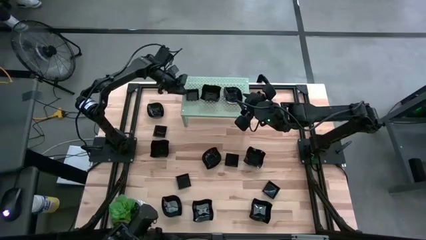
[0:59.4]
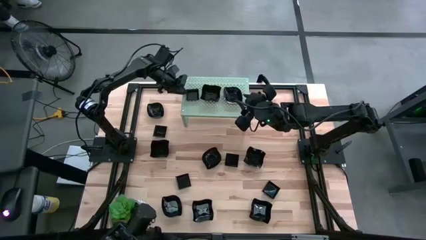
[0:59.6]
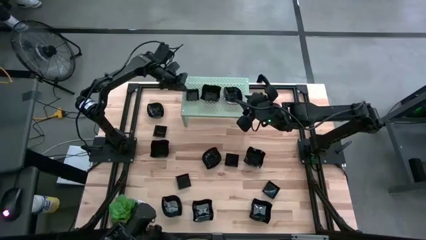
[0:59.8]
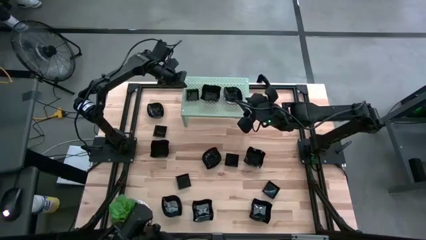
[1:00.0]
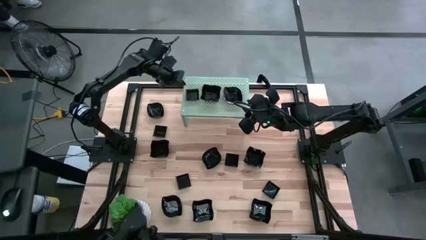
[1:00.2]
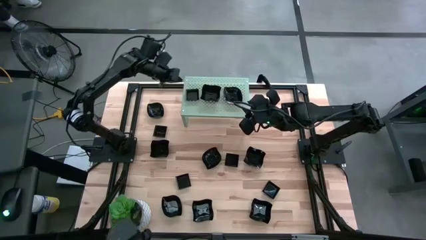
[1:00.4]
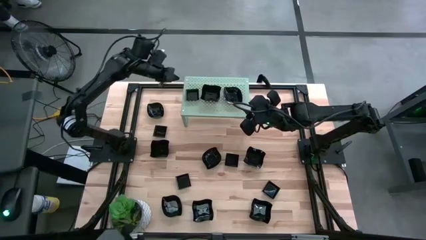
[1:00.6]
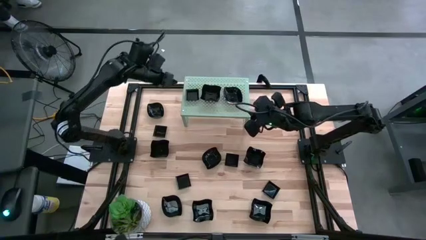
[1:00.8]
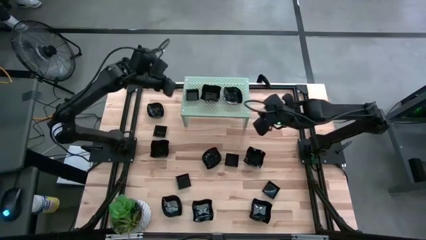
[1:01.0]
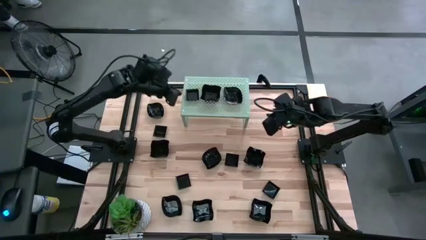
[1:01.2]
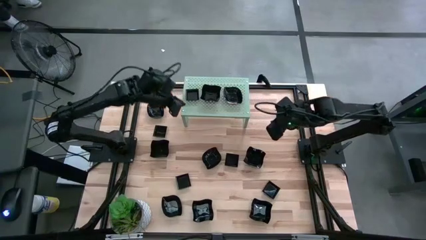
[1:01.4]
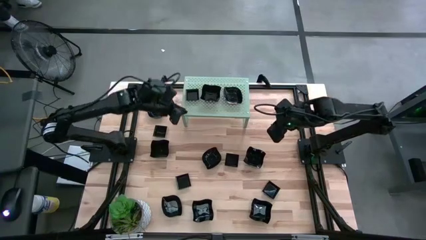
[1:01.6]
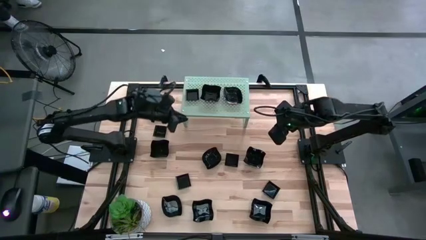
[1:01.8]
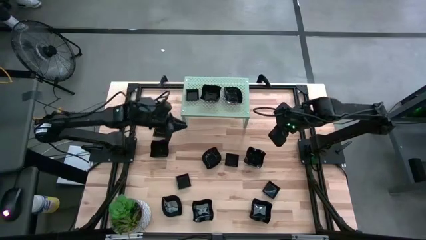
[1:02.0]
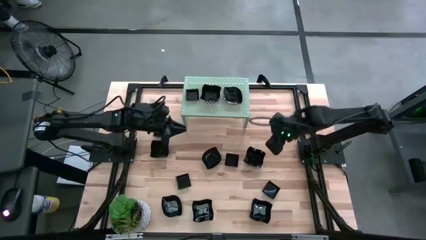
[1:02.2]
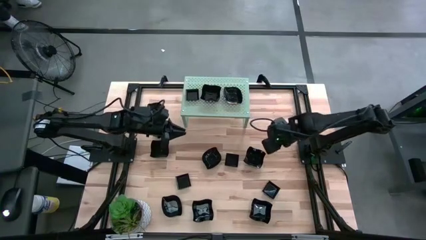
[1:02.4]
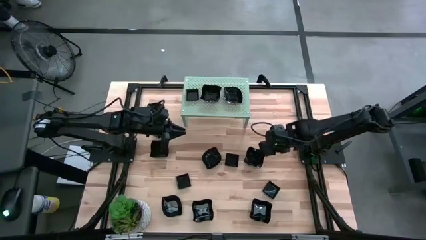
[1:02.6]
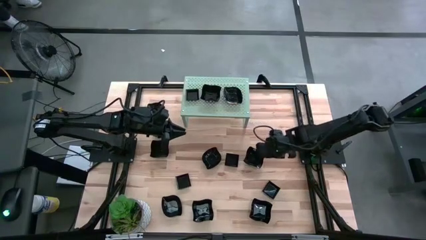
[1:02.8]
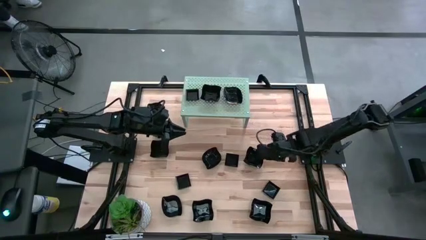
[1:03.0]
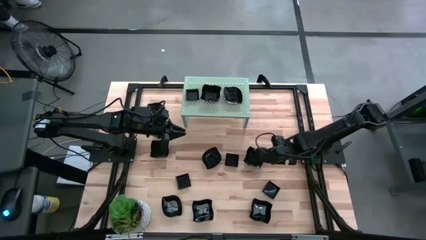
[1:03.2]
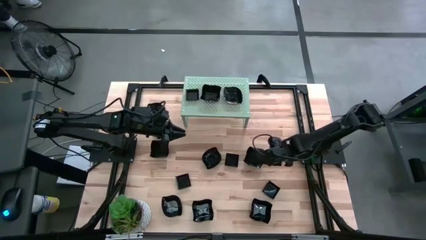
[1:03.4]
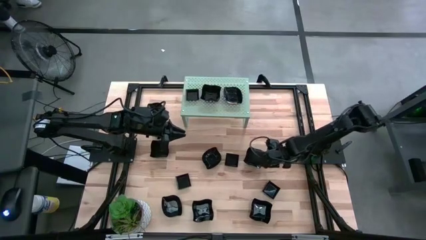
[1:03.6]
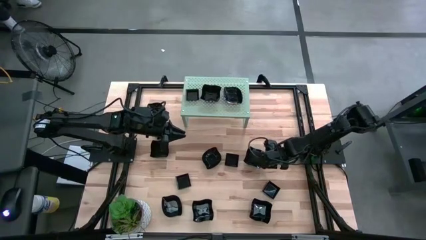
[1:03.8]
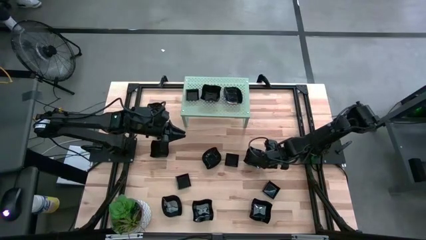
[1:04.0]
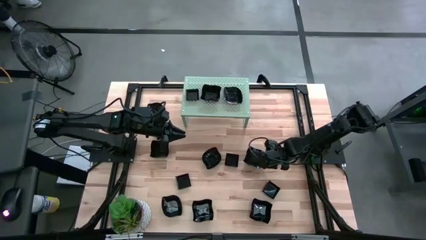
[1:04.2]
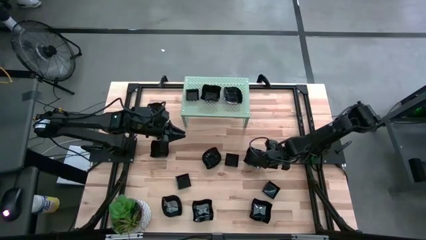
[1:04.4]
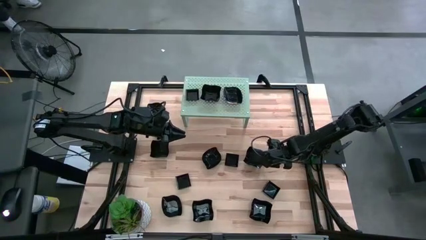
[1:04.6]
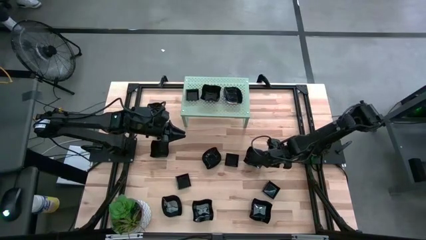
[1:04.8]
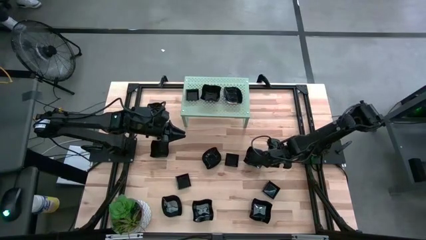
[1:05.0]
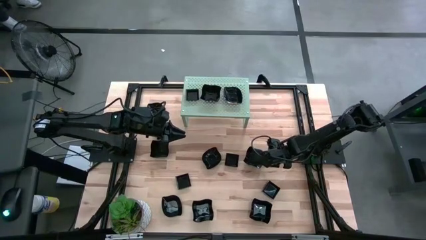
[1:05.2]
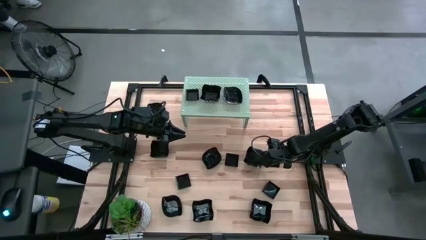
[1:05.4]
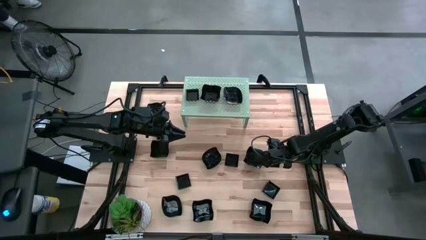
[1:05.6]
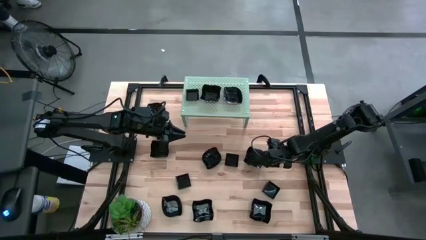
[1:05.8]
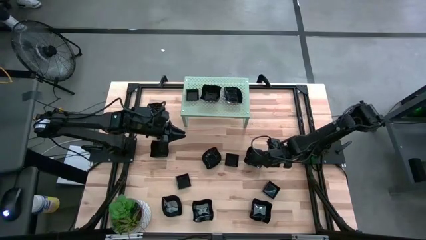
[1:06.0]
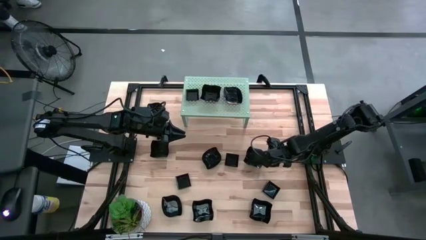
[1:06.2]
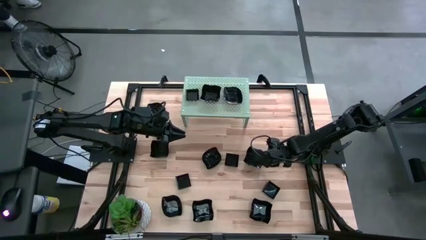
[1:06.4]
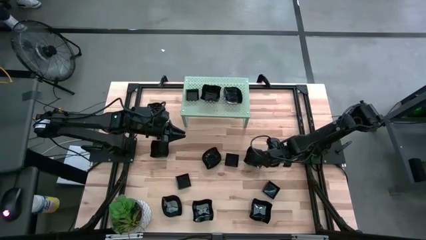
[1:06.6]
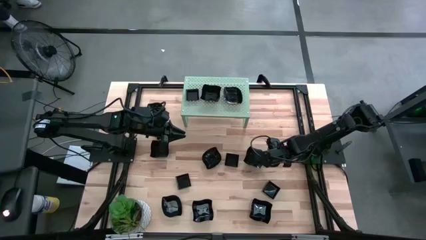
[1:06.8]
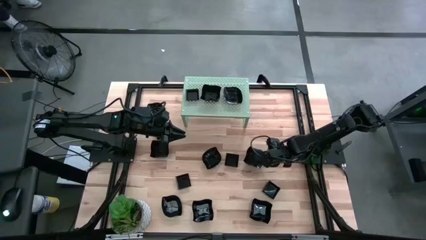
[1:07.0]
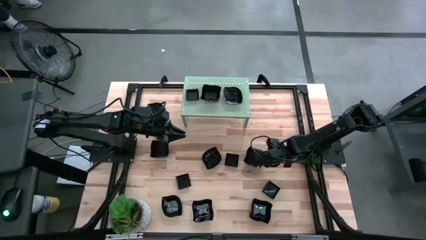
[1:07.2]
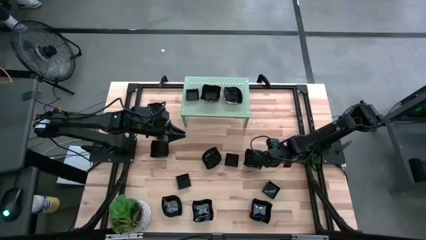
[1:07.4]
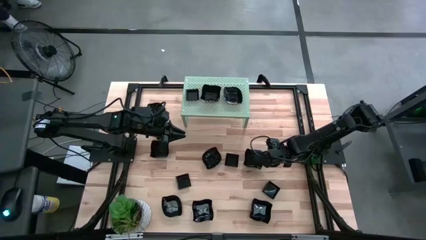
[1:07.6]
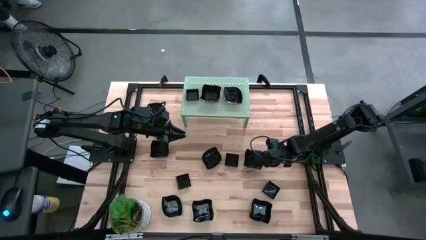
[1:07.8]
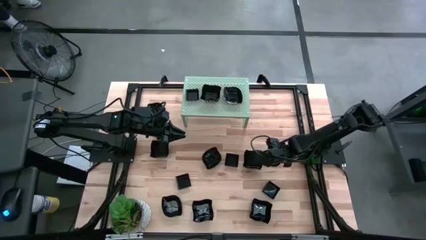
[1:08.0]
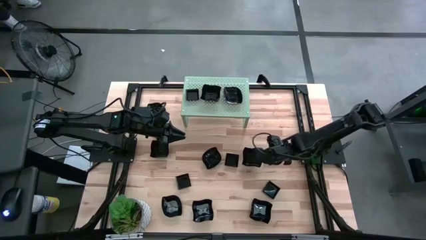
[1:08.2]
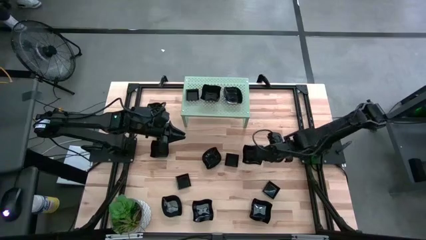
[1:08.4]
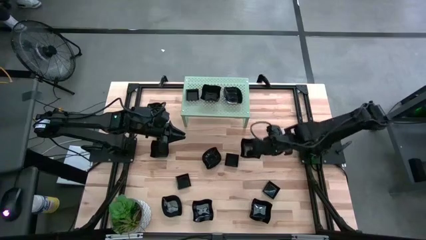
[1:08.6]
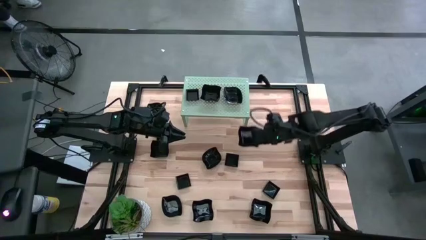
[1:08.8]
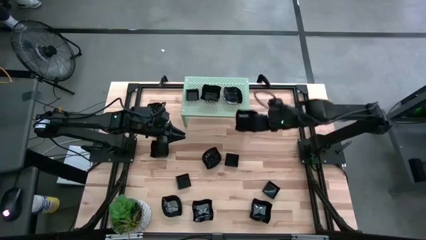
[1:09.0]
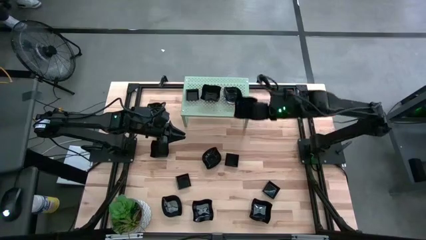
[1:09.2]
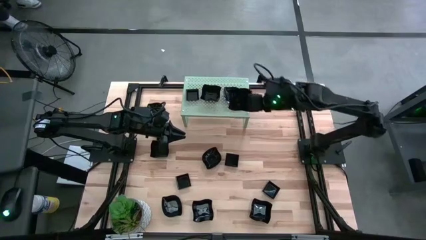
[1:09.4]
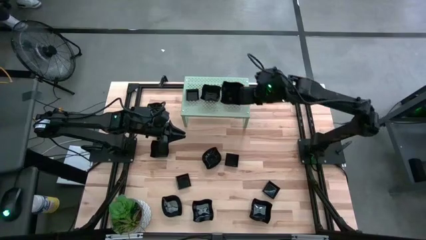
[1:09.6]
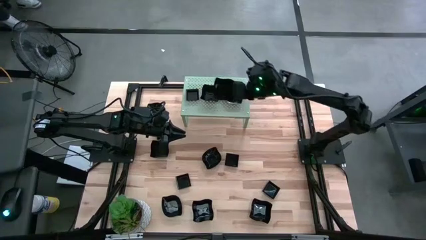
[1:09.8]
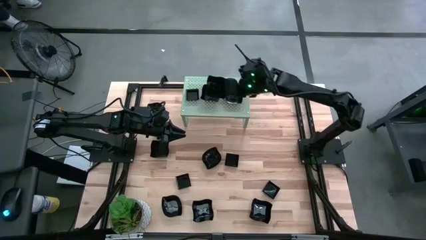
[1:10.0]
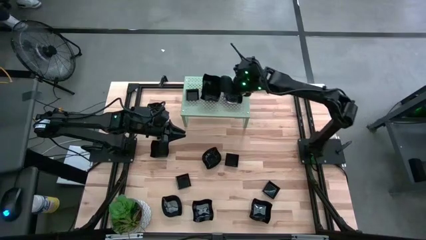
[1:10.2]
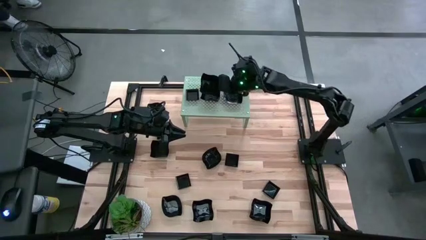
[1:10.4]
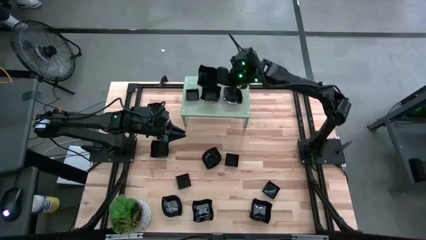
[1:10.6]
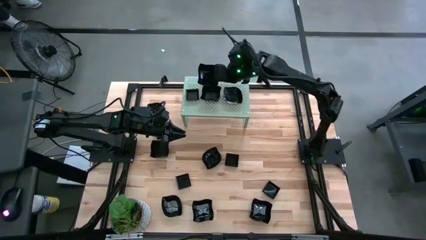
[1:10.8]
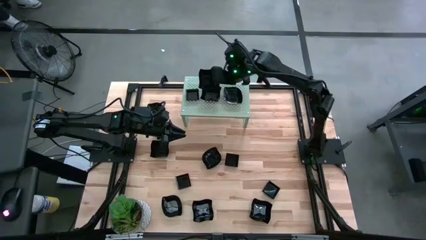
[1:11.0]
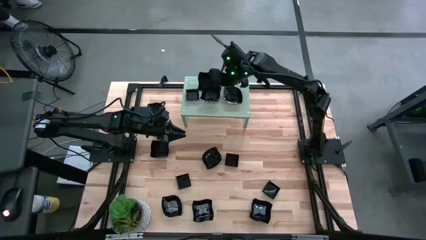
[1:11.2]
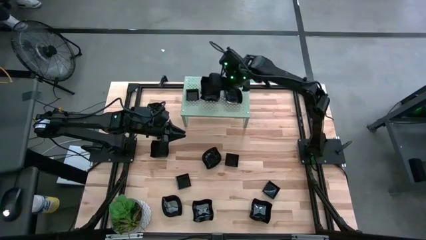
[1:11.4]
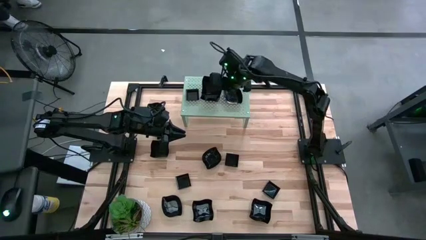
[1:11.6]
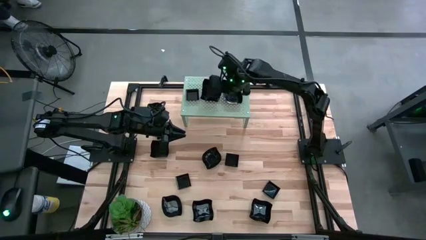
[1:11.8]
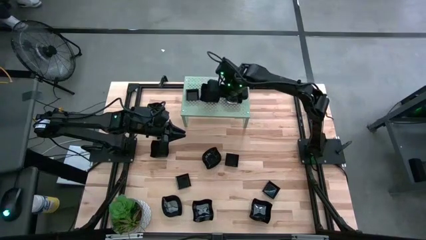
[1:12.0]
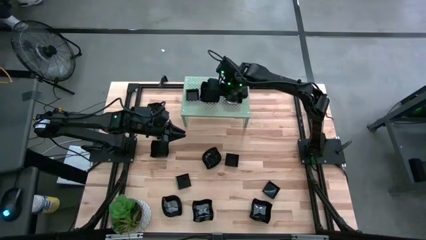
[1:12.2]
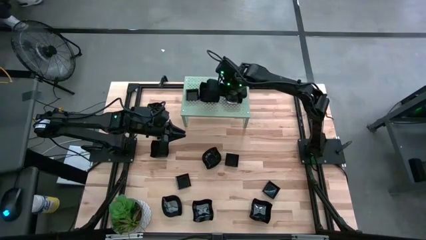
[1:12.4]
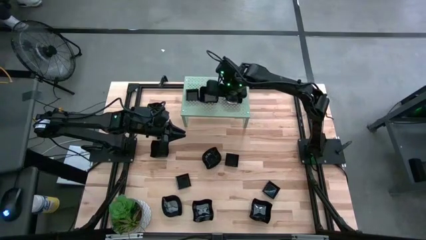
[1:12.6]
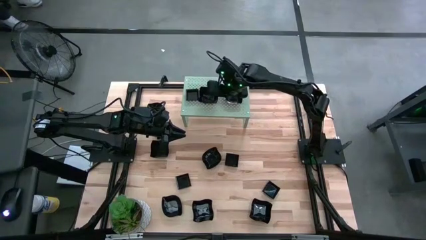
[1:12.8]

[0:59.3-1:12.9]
Task: Pick & Place Mini shaped plates
Stack the wave square shaped plate on top of the wave square shaped plate on the shelf
